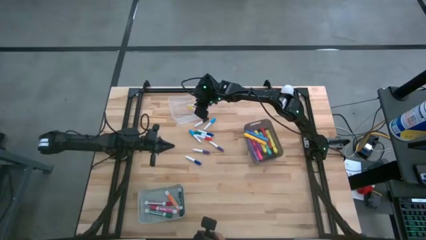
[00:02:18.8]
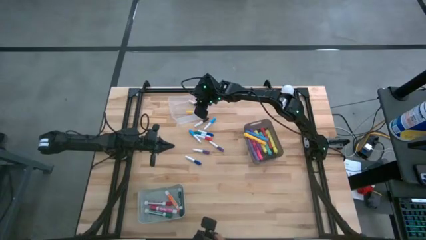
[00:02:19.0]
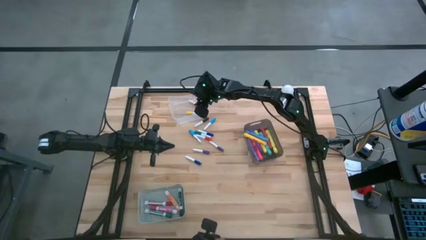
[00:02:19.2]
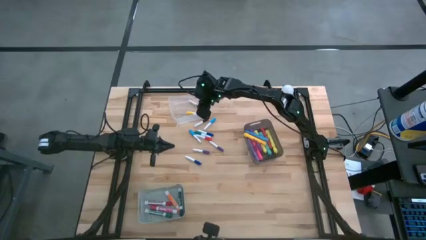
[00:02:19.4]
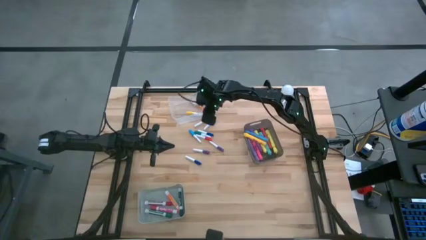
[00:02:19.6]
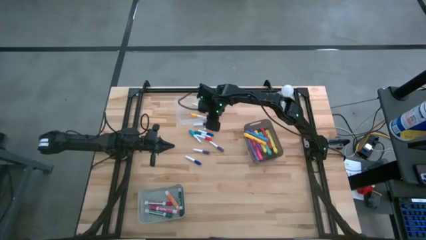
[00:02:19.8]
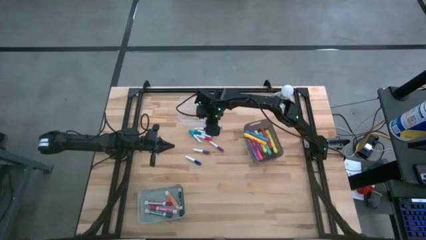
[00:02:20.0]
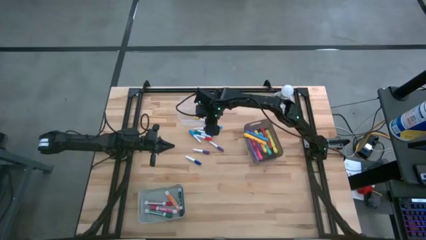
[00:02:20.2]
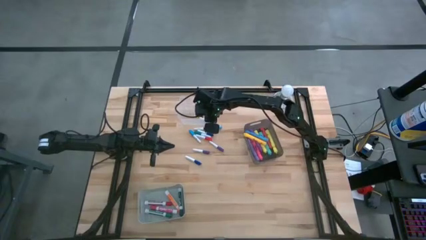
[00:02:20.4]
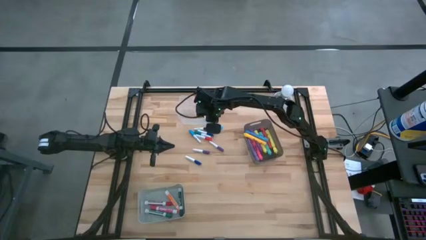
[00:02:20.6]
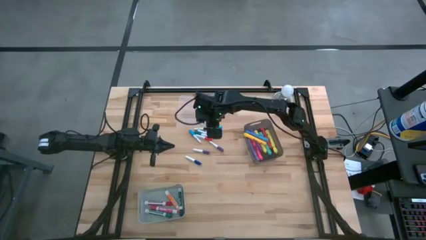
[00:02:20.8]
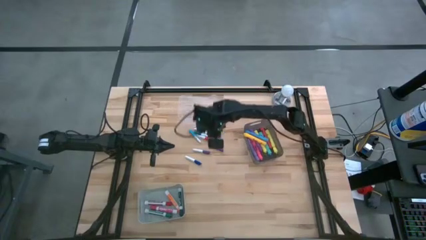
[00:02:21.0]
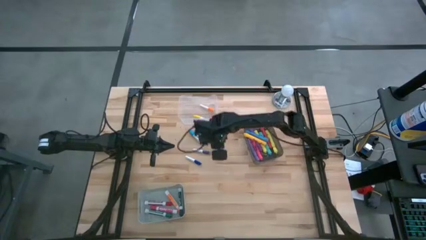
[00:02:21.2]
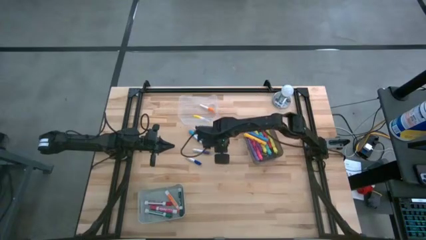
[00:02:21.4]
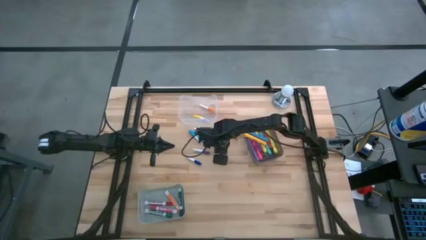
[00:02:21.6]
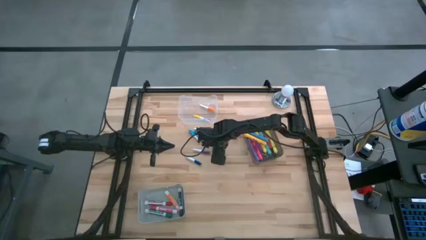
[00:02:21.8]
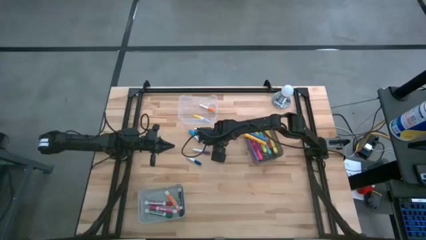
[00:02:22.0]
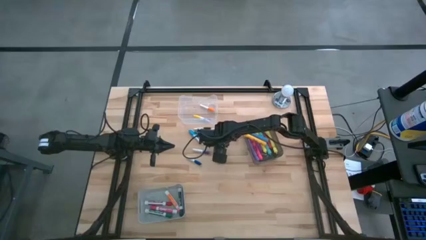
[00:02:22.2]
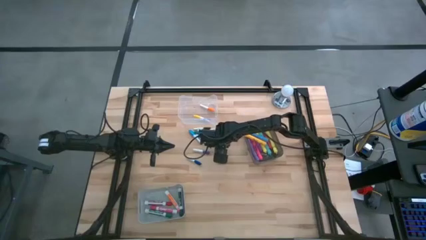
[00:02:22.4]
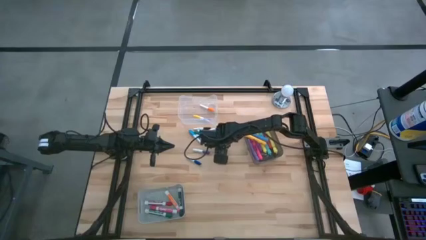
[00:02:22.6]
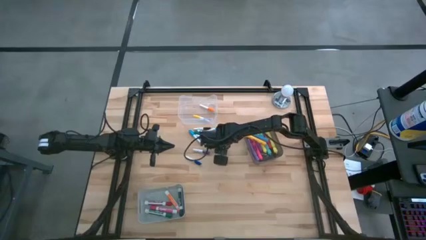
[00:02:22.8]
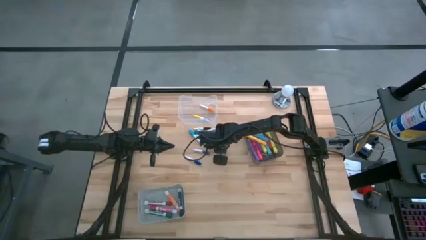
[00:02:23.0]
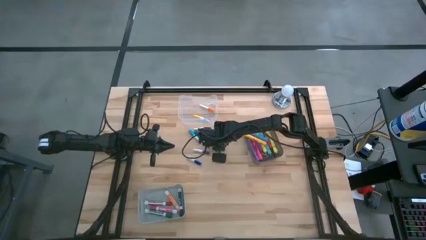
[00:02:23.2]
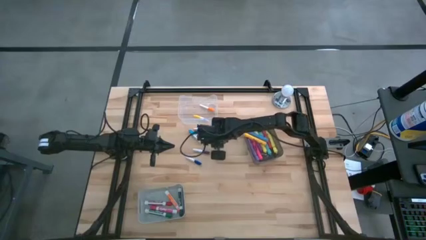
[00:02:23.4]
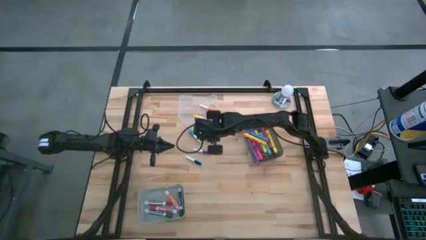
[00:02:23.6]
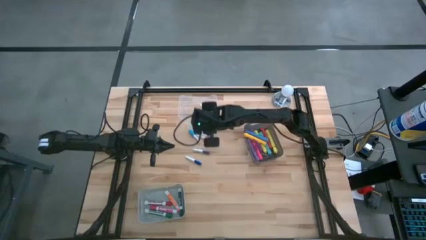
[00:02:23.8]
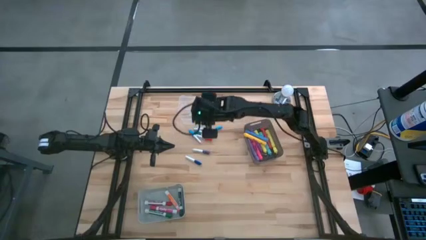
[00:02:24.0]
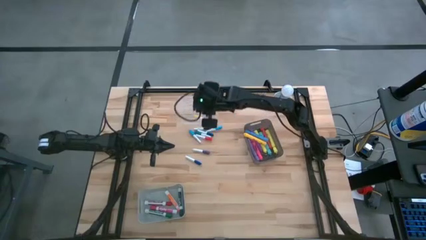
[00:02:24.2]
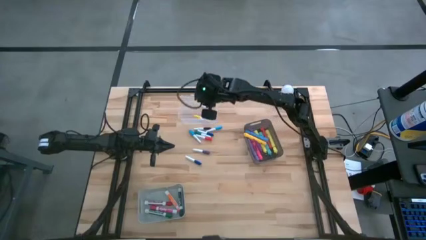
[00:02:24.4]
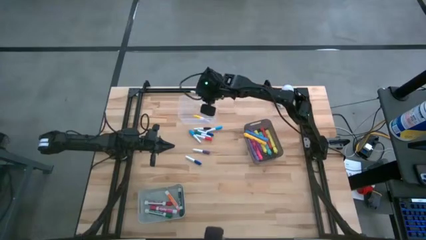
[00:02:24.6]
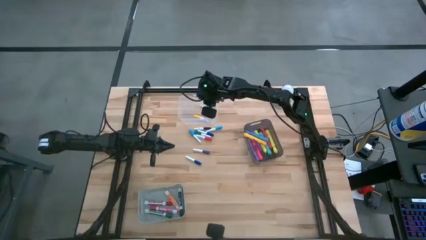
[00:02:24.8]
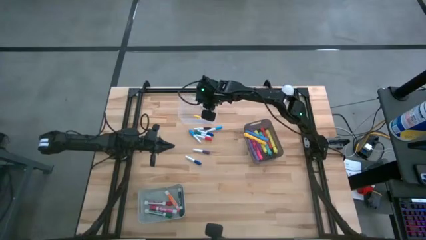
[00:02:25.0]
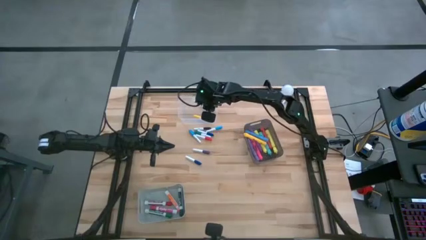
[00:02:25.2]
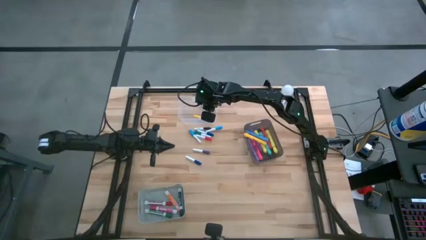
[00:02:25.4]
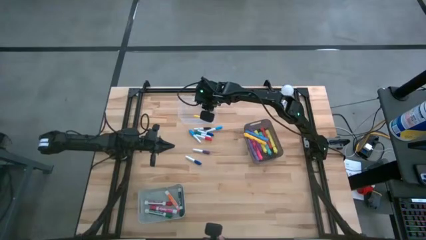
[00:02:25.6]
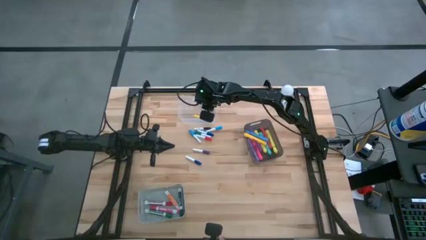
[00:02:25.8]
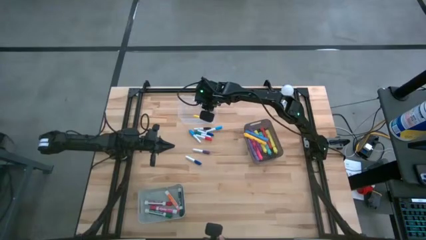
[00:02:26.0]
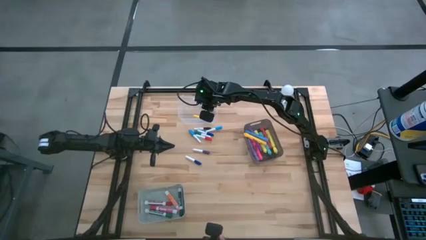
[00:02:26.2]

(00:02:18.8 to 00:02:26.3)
Task: Pick & Place Markers
Put the right white and violet highlighter pen into the transparent bin

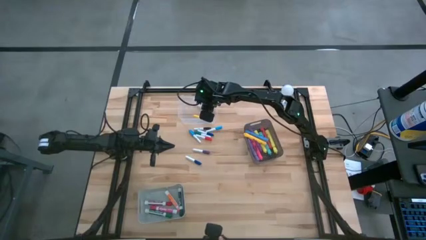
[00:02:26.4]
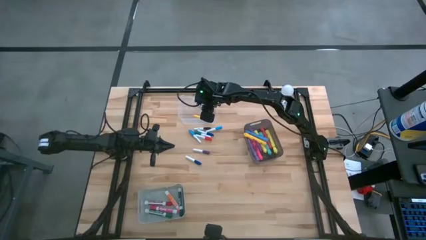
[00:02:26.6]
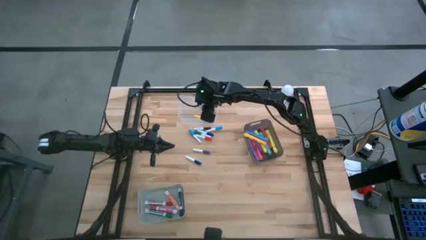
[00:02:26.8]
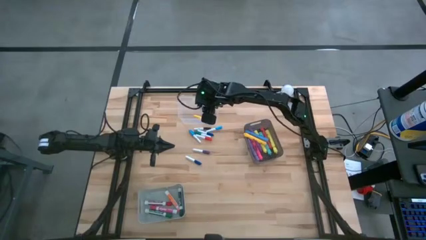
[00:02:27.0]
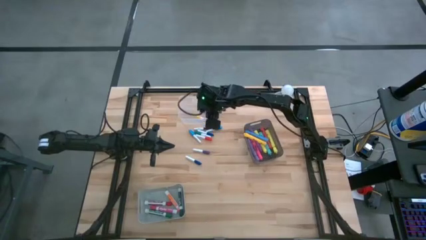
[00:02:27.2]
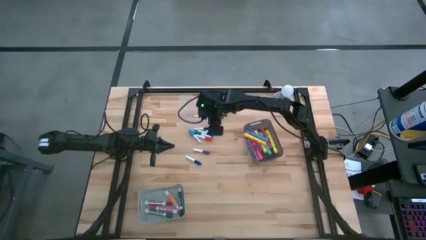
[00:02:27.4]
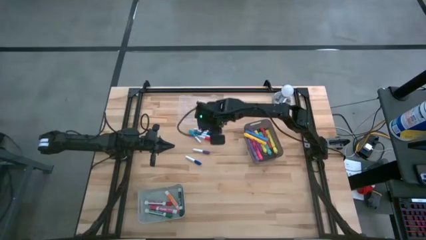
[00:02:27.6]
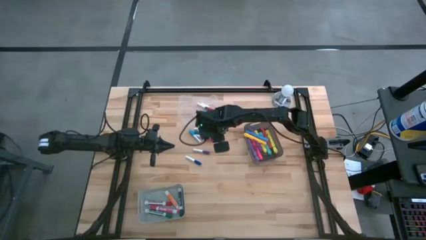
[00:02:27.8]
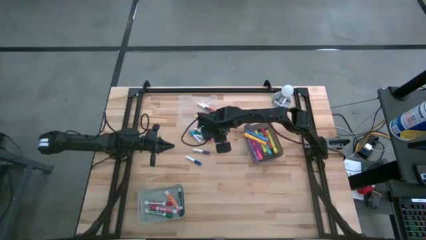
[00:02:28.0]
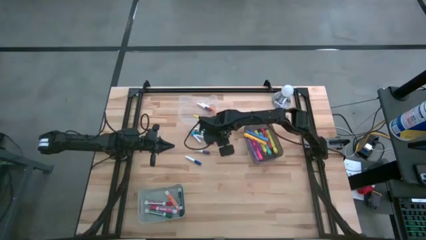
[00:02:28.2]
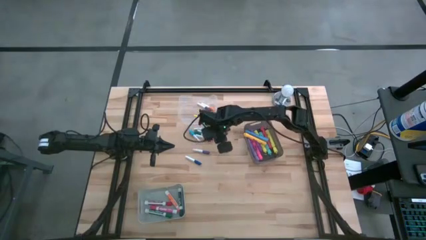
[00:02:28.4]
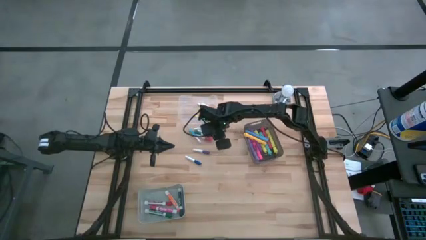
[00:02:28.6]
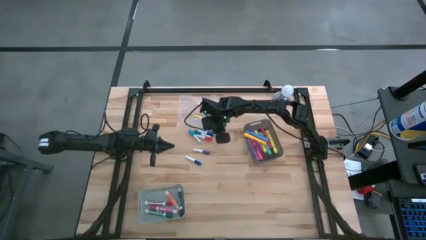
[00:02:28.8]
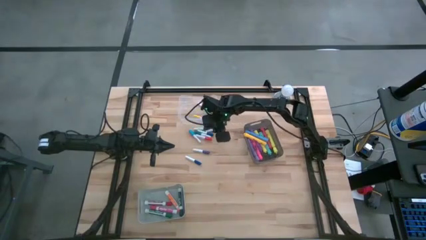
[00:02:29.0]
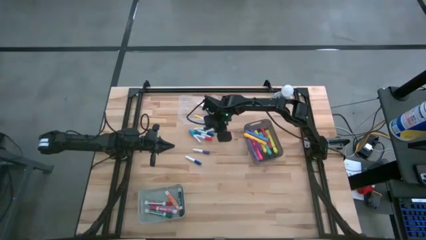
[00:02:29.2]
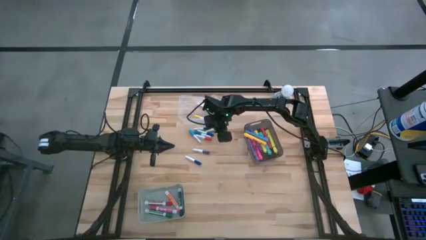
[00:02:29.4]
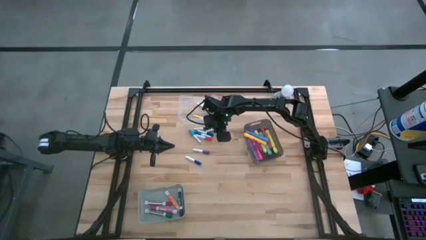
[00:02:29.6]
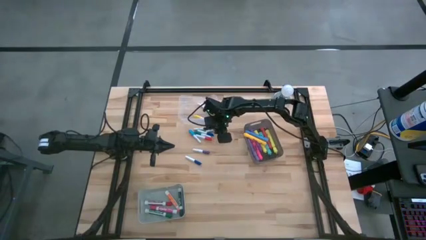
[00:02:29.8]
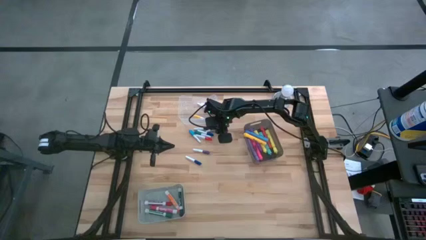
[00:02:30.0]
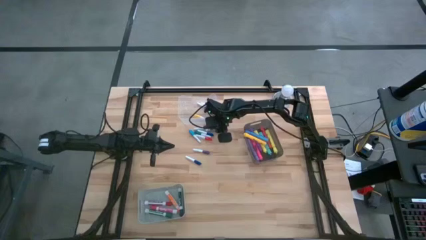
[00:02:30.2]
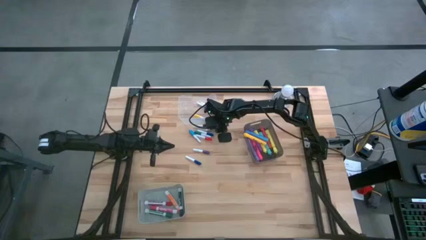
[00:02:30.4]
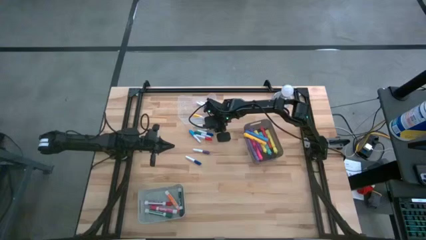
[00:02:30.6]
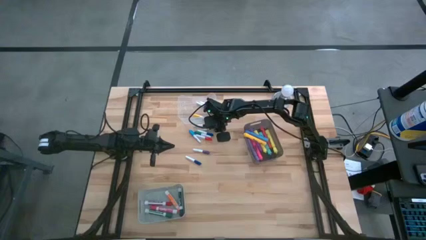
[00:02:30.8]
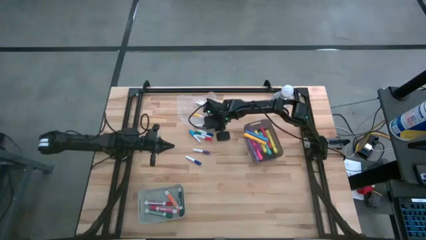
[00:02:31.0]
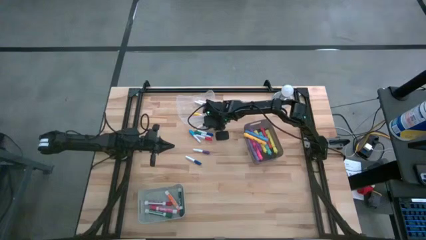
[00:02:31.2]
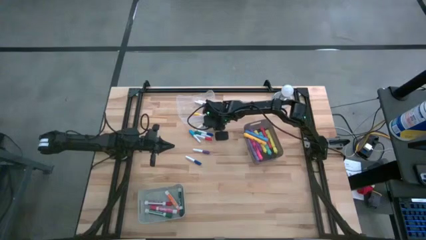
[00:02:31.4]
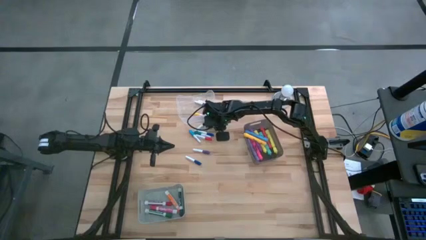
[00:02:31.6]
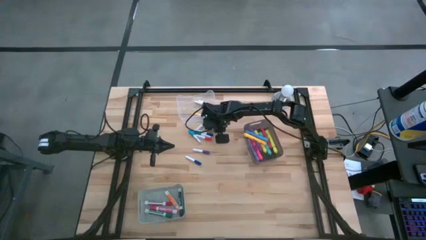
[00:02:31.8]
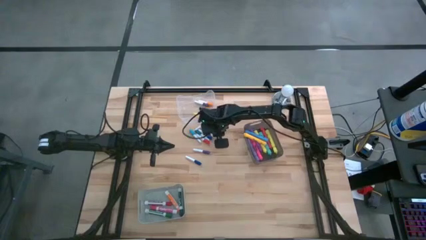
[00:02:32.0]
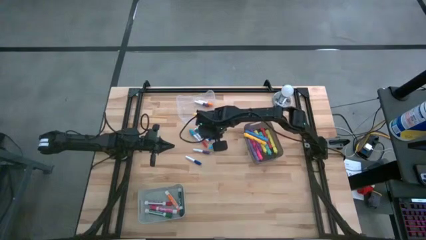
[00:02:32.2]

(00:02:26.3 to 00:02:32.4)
Put the right white and light blue highlighter pen into the transparent bin

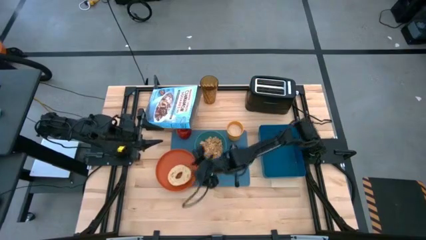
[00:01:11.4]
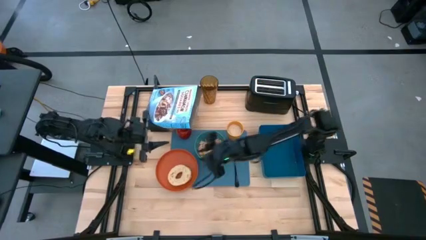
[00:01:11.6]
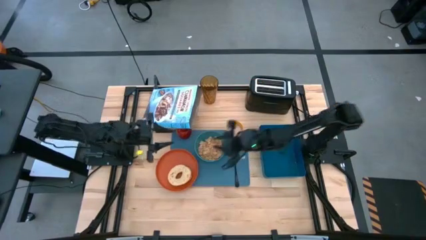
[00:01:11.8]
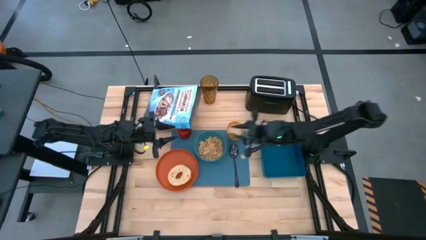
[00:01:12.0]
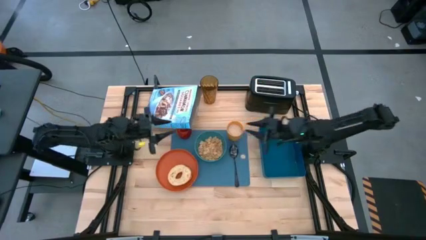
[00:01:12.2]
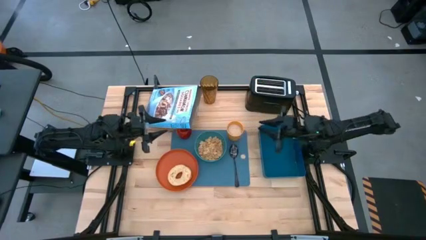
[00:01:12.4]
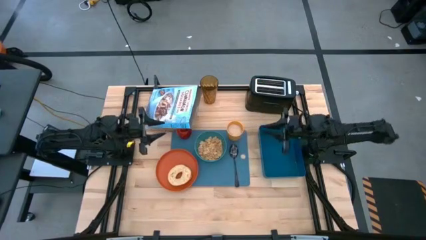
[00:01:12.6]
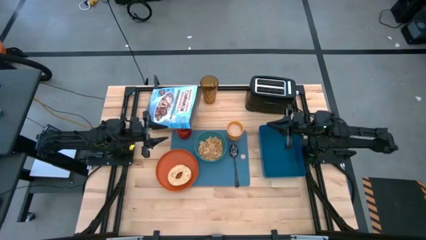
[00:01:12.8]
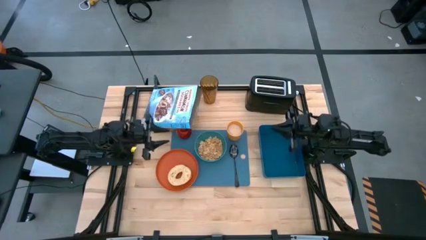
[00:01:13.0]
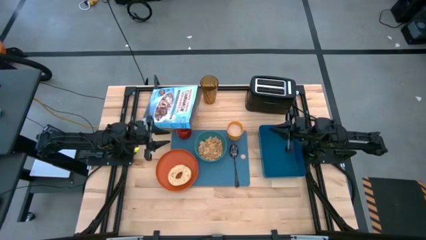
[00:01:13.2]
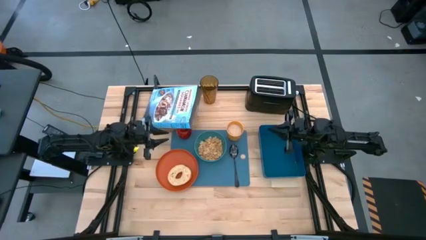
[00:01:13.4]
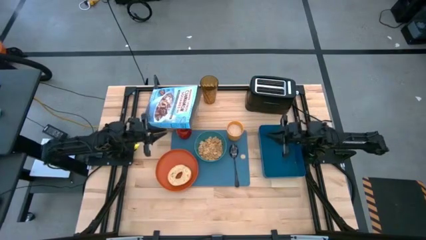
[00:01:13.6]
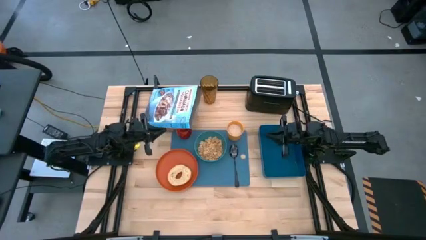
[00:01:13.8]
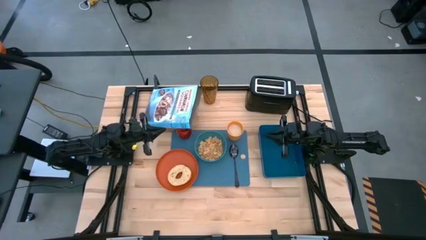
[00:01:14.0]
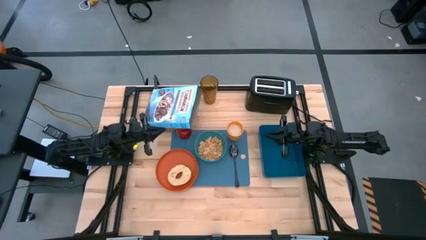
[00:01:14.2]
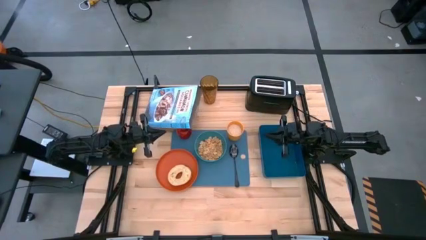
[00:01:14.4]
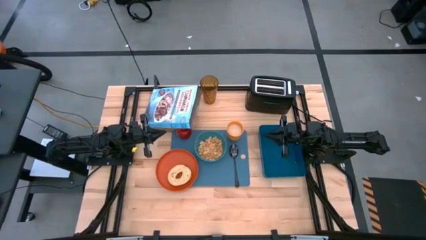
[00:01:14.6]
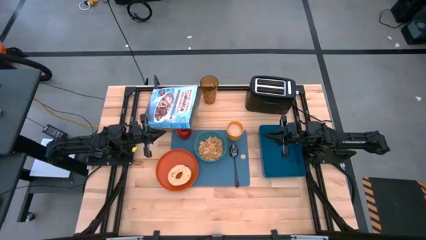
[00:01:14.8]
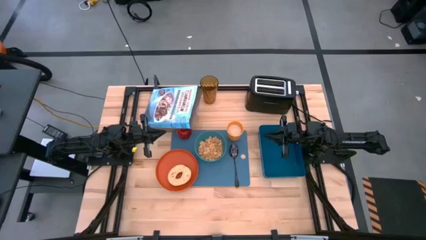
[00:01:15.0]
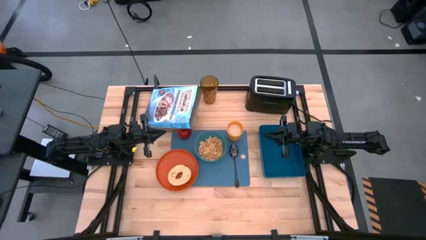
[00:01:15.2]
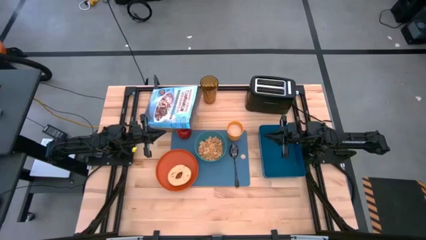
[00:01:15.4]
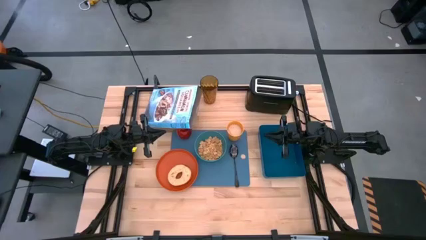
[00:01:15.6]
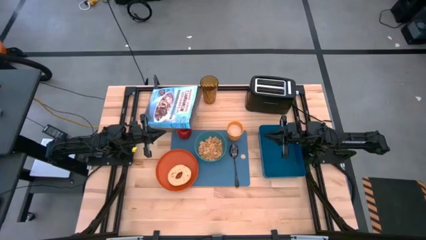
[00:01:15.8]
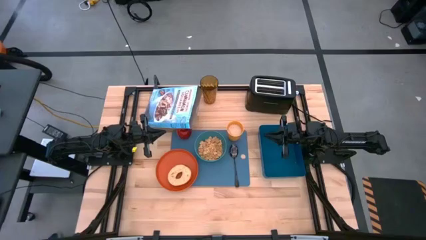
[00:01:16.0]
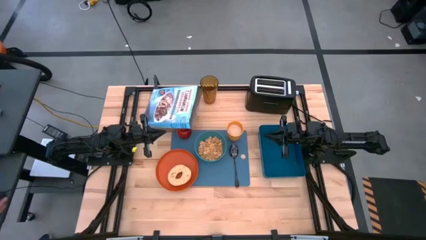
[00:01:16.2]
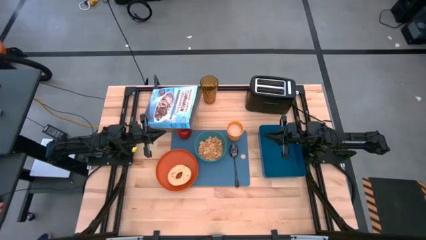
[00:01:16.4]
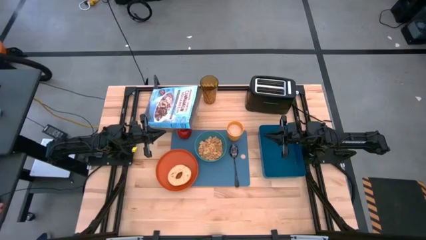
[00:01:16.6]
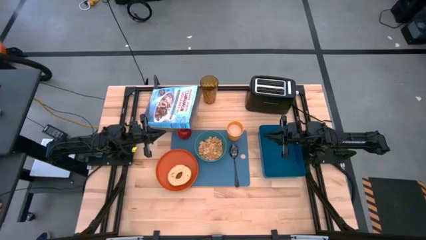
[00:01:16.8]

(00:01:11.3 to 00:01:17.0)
Task: Arrange a breakfast setting
Return to Home Position
